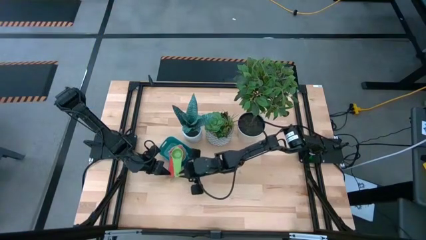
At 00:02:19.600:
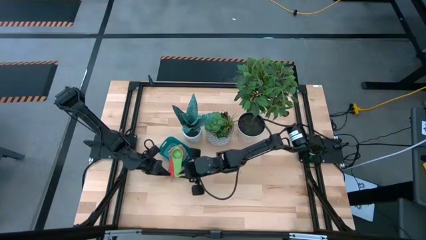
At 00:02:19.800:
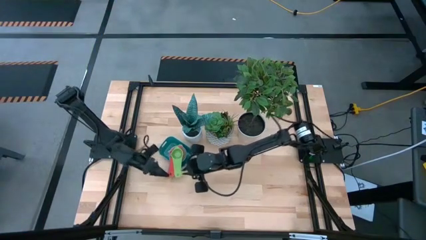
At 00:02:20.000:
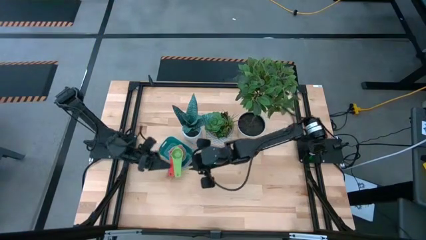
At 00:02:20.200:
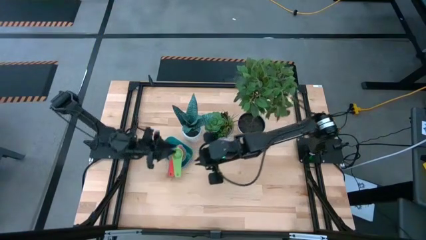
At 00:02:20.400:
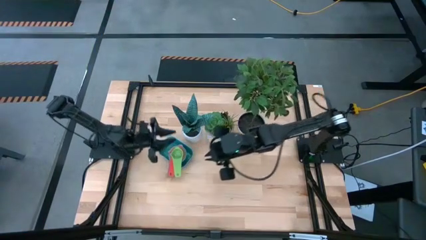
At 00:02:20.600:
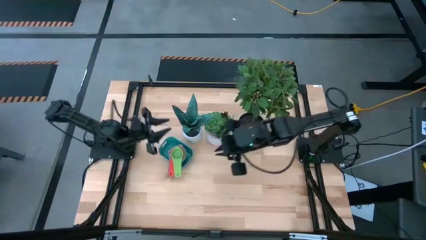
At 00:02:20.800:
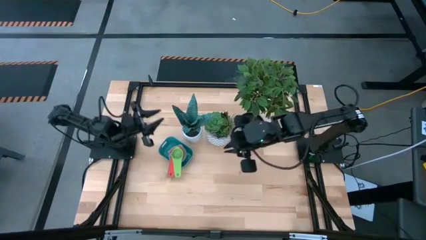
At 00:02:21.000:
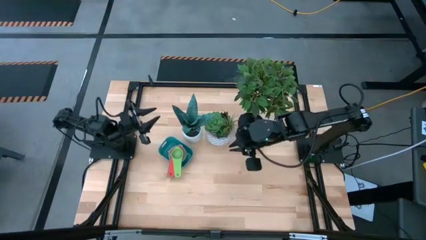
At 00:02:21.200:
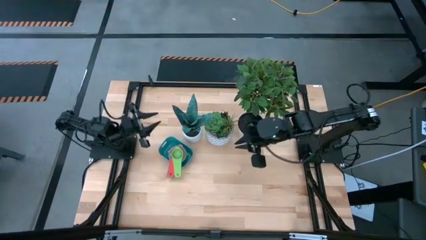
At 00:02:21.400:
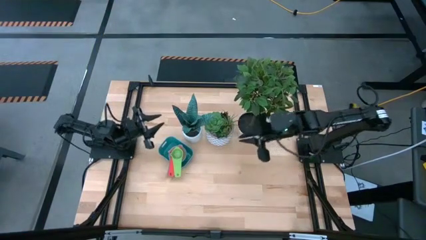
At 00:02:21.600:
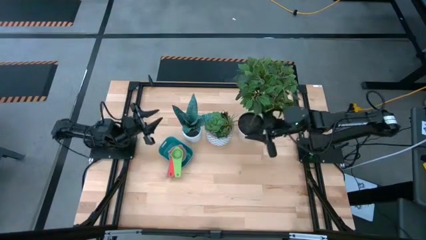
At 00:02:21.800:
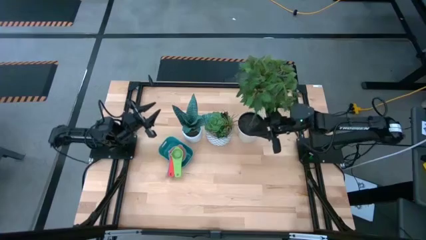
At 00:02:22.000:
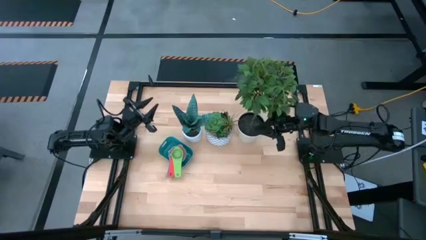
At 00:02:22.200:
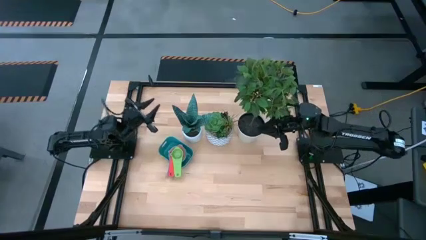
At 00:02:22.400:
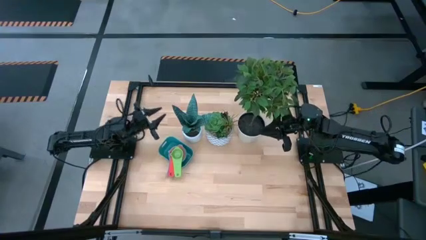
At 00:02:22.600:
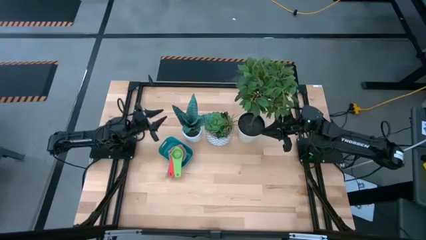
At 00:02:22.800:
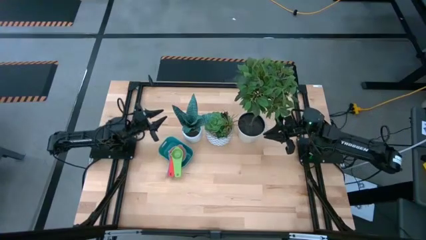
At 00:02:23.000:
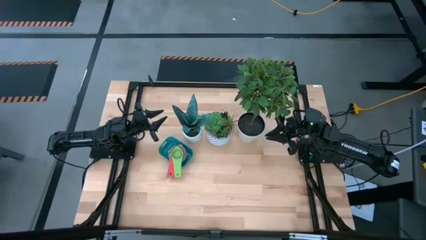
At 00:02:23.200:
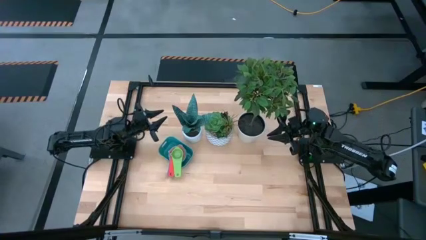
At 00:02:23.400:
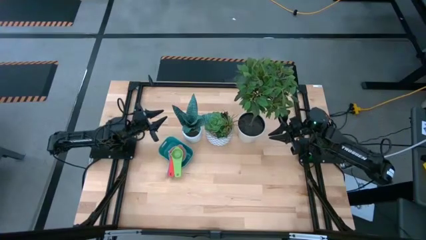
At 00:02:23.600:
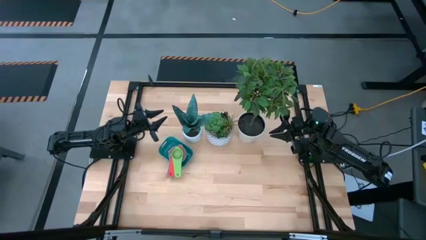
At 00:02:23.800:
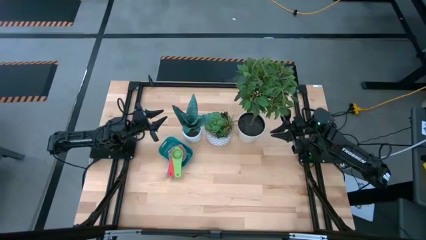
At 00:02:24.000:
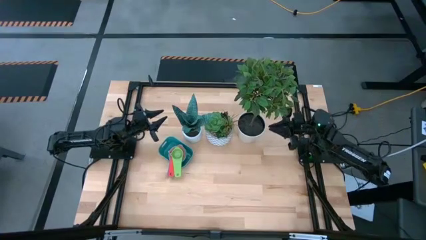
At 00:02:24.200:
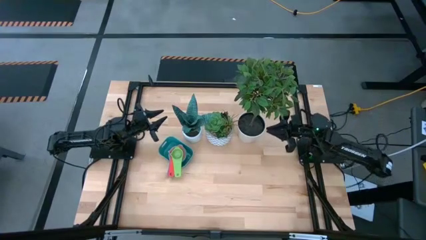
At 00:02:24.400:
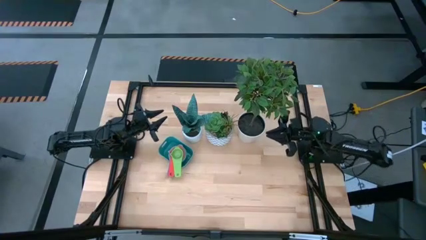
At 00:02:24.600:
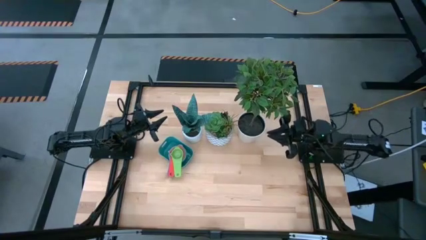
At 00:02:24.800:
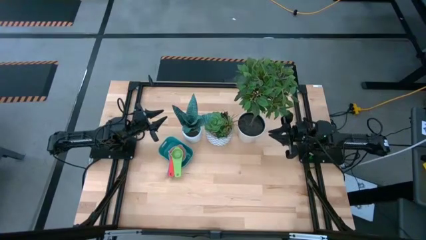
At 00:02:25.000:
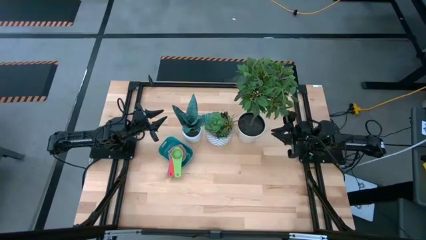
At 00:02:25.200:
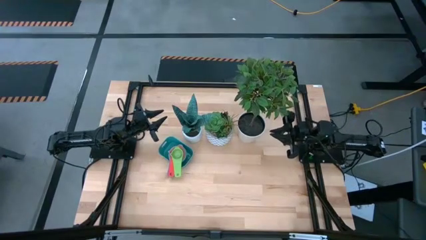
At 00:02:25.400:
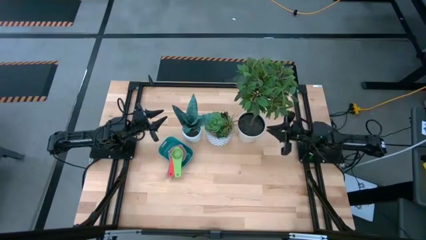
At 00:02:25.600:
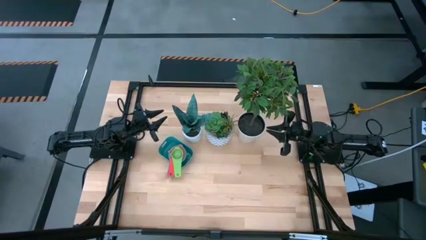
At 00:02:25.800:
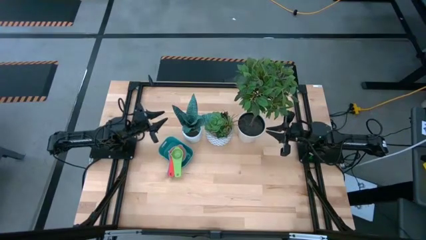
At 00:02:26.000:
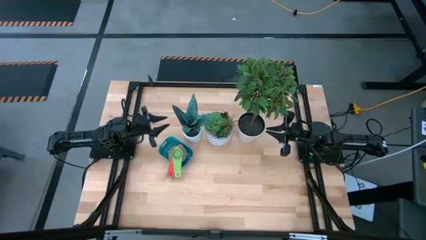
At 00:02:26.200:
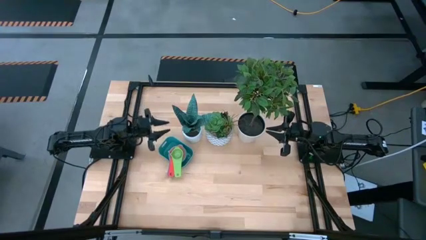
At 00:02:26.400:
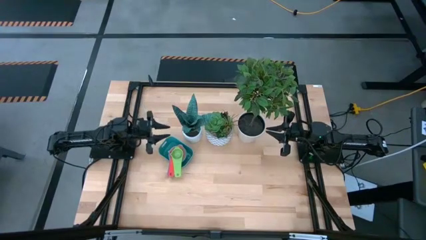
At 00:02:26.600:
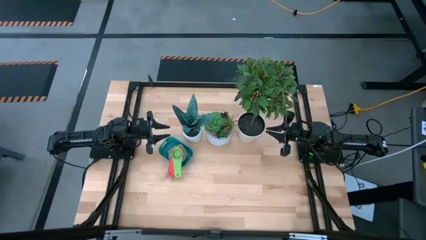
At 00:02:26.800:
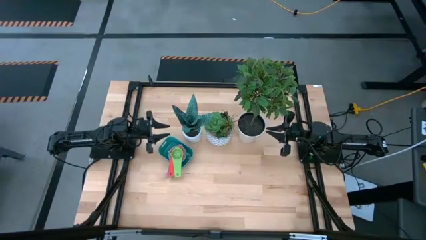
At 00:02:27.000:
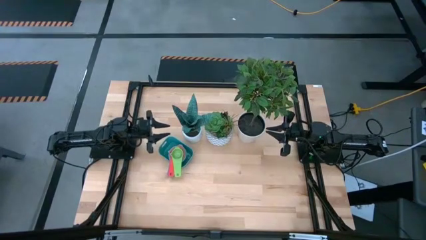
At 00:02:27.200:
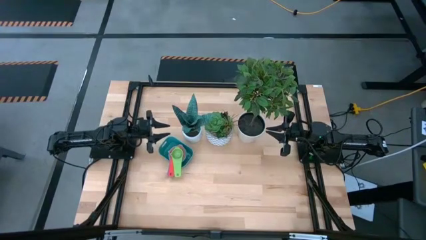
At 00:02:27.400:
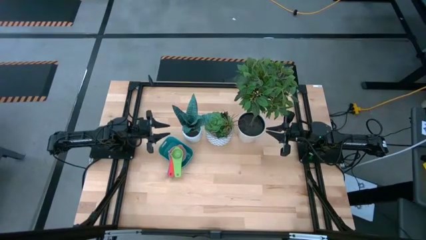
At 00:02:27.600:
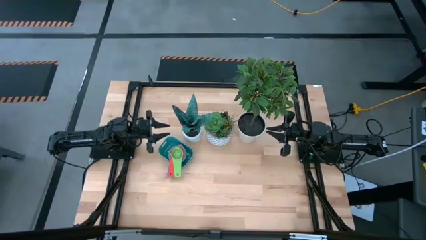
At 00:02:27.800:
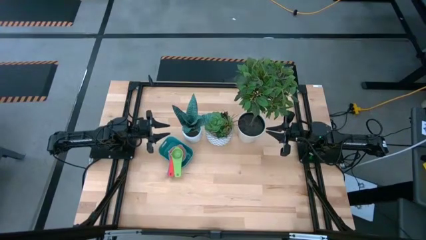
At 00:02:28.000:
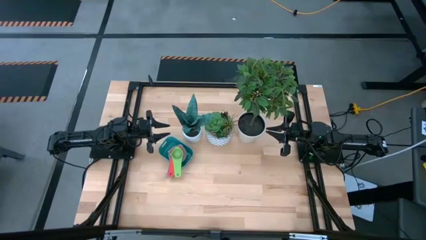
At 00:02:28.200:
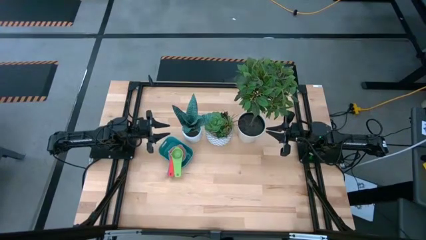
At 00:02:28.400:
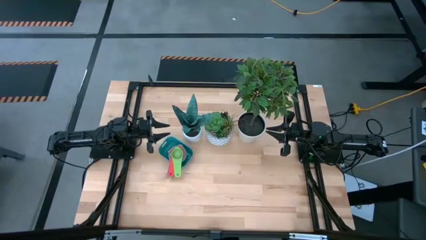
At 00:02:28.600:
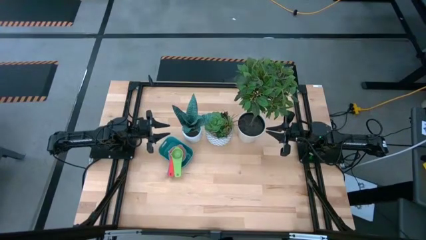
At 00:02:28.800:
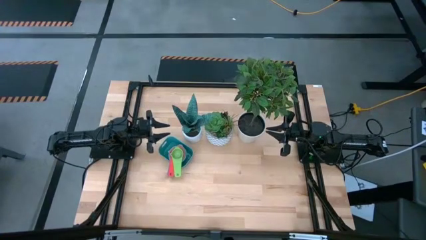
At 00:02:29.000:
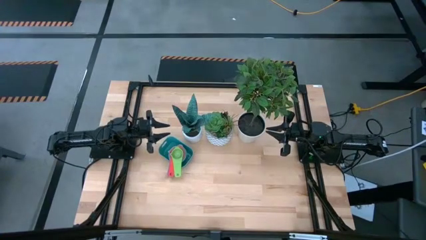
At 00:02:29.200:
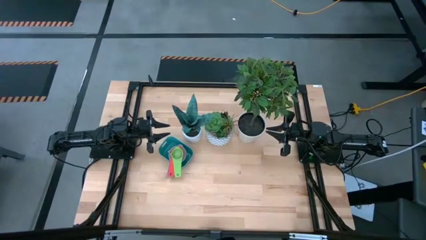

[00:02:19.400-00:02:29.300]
Task: Nest measuring cups in basket
Return to Home Position

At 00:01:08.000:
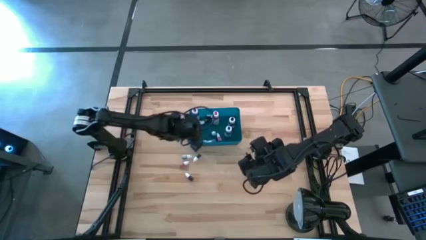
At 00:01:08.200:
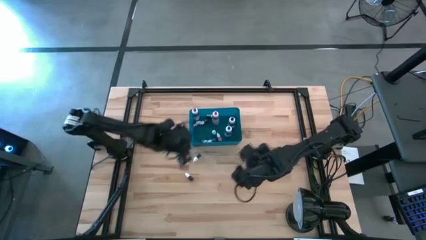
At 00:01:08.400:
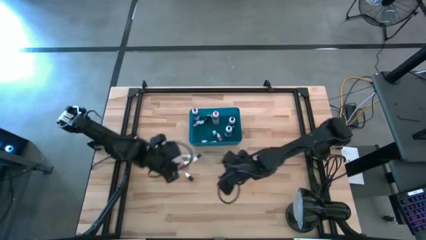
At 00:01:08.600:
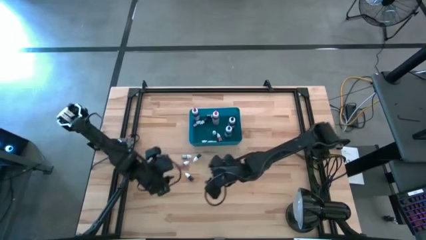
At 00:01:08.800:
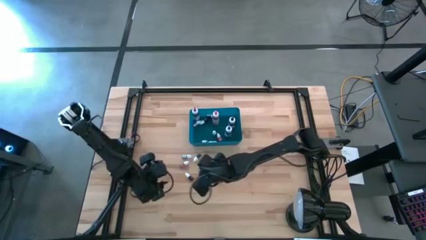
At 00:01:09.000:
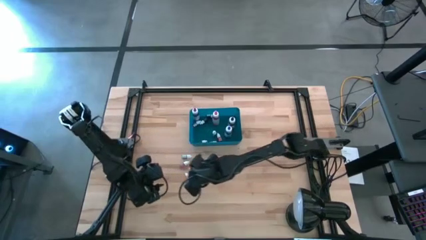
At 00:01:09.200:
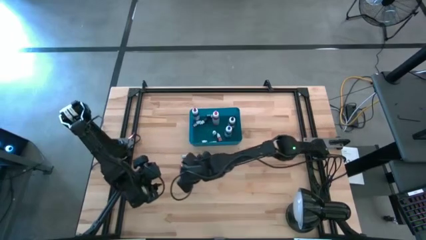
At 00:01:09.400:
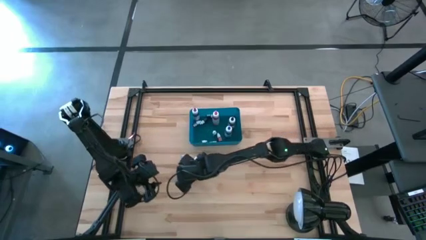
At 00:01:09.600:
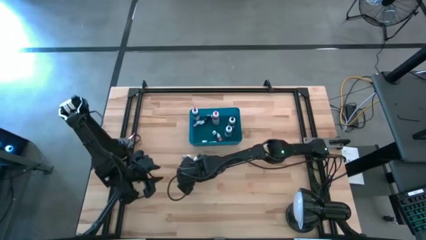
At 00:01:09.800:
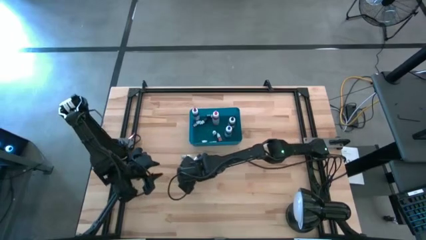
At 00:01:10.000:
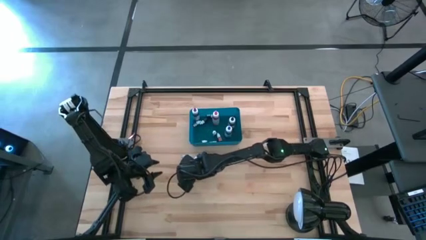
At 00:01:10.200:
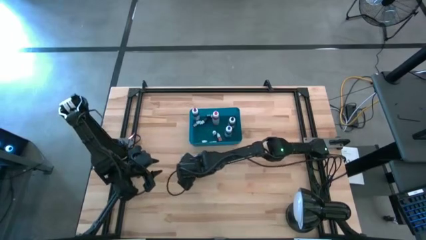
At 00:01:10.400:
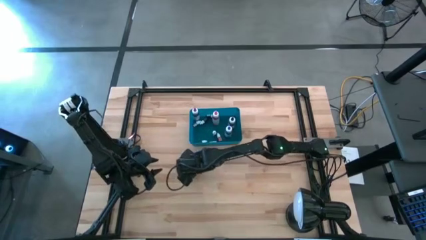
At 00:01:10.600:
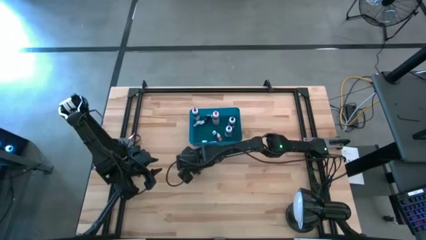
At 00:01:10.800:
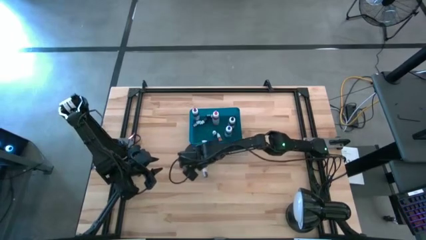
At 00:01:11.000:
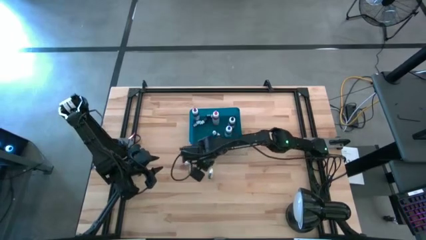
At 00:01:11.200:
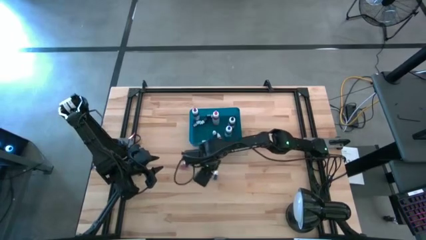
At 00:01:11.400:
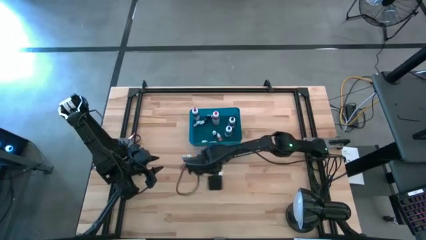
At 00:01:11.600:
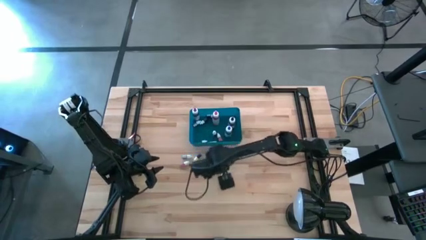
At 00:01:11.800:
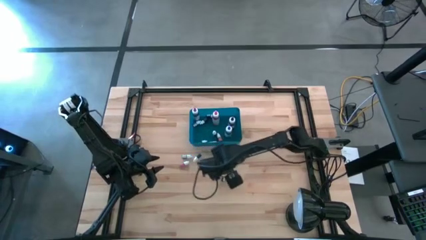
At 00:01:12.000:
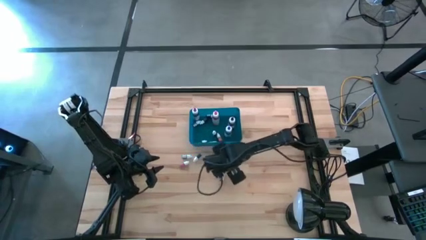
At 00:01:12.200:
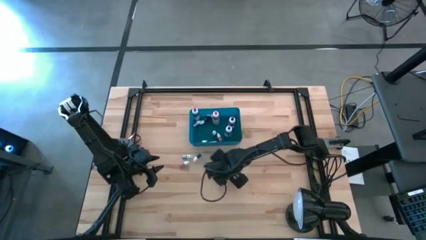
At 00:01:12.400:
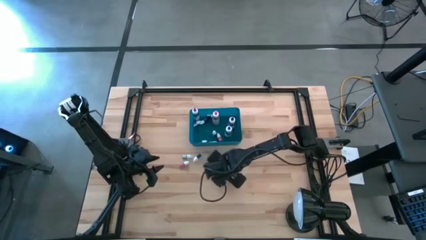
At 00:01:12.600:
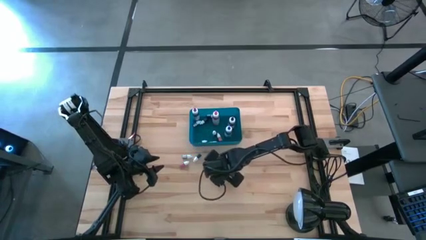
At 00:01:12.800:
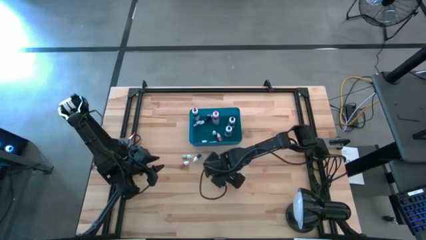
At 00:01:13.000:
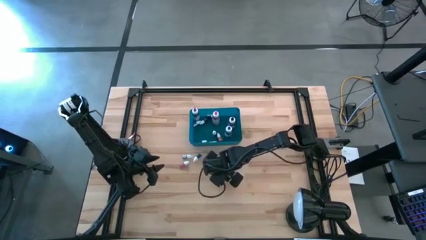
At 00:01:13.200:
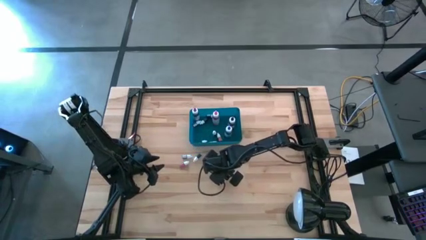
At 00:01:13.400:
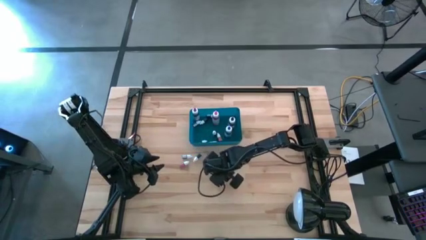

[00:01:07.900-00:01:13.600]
Task: Pick & Place food coloring
Put the left small black food coloring bottle into the bin

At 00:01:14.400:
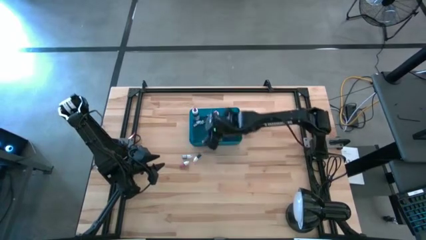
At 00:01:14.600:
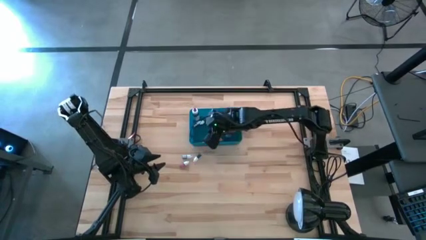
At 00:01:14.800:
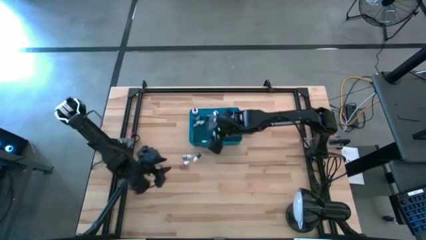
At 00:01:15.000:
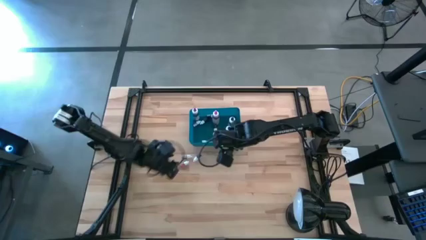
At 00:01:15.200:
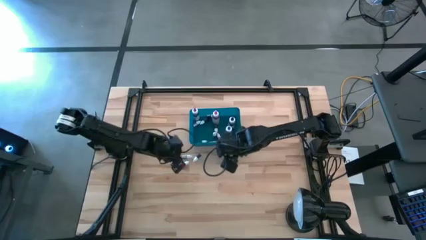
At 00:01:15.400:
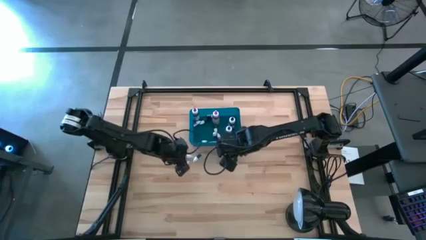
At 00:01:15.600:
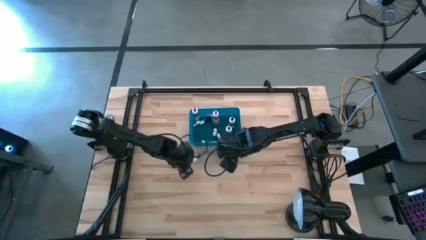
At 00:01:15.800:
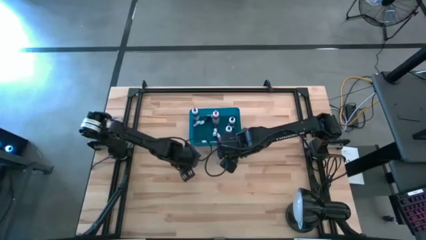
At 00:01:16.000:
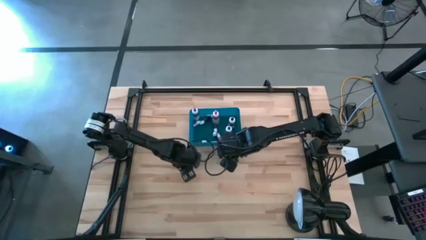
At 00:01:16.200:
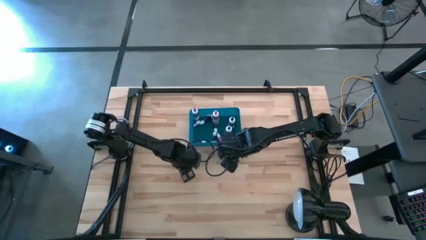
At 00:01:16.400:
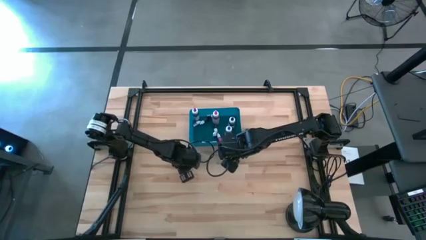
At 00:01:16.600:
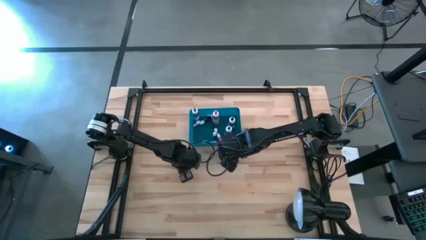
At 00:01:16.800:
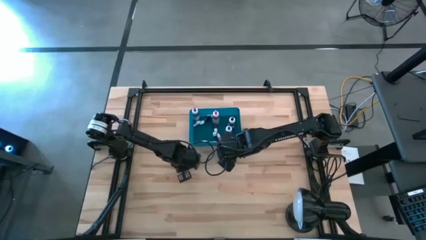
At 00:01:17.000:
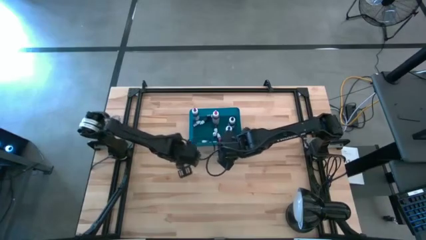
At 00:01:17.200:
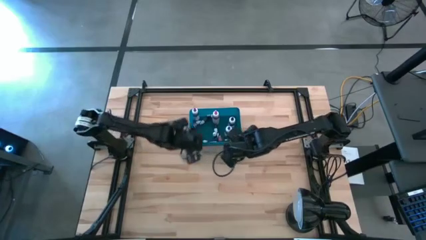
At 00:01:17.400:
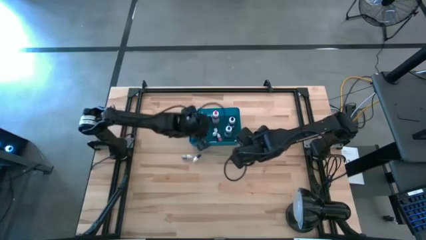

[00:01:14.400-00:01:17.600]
Put the small red food coloring bottle into the bin
